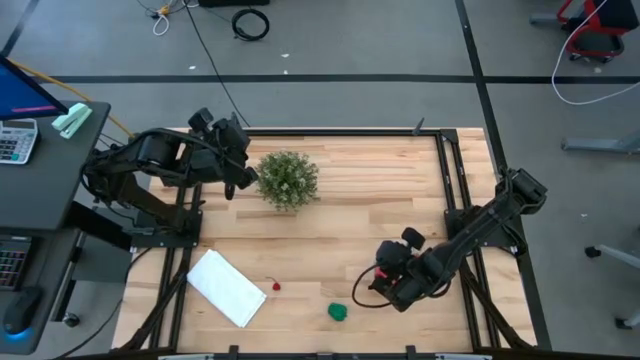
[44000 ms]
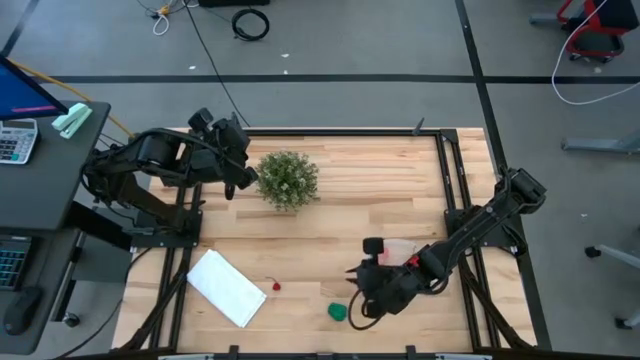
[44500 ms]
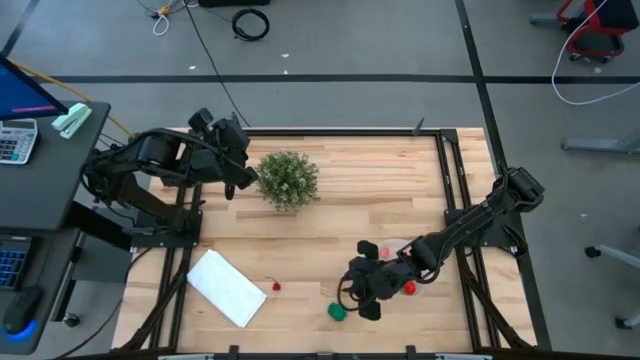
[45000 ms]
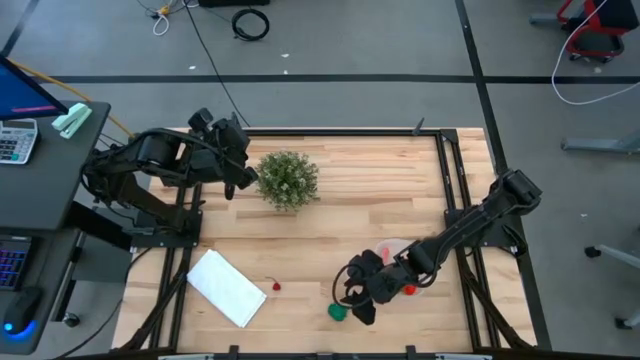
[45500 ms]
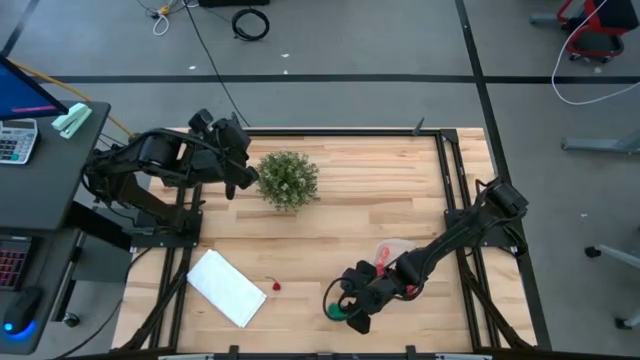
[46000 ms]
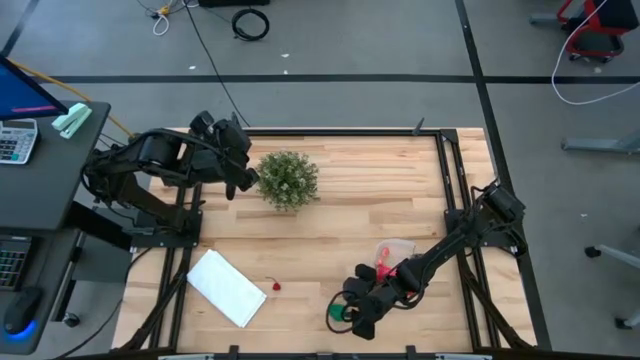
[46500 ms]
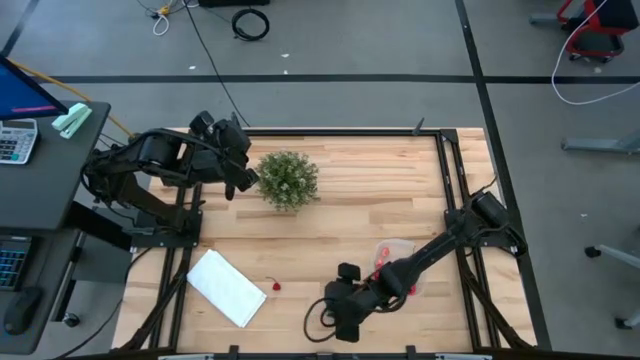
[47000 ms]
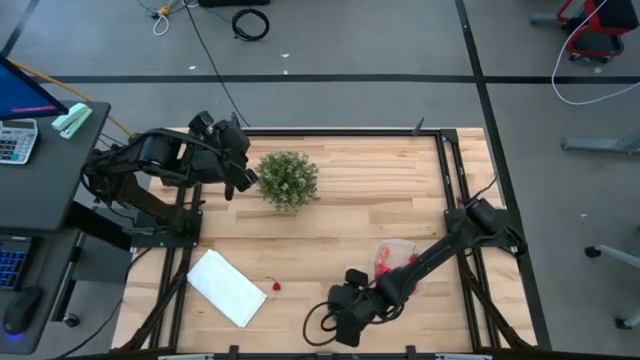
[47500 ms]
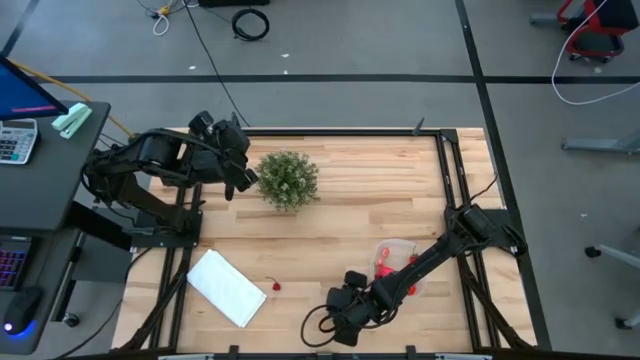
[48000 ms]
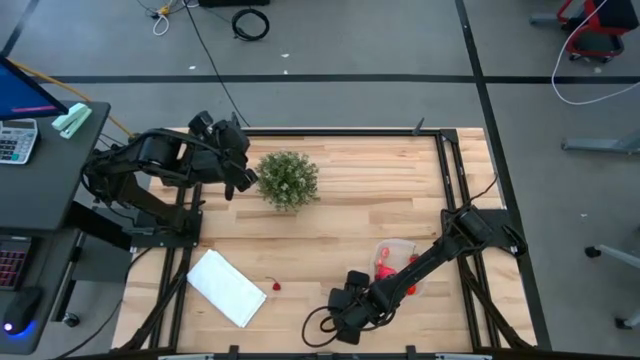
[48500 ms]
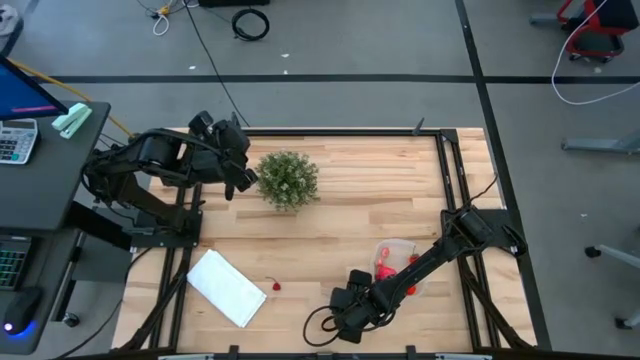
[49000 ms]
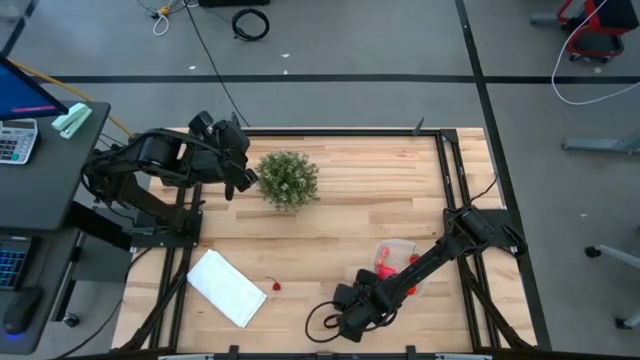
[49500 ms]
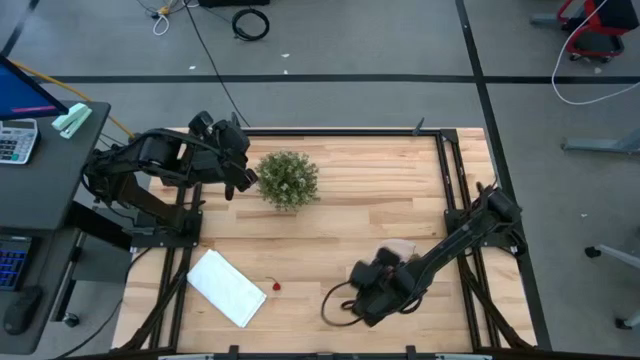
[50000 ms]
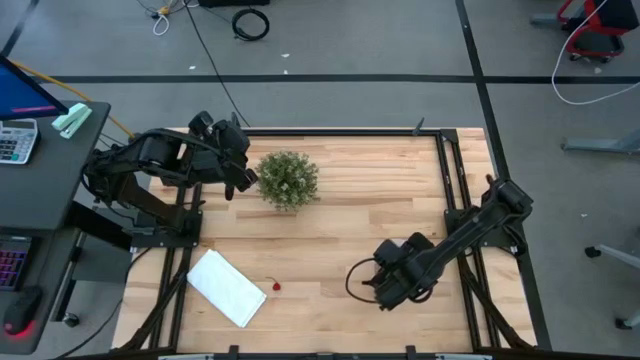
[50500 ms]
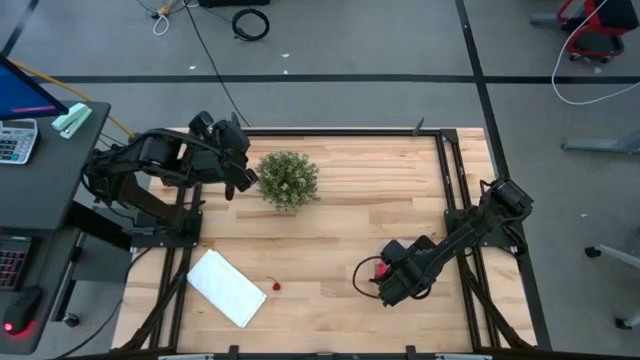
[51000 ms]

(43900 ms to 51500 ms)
Task: Pick and placing Produce into tupperware
Put the bell pepper into the transparent container

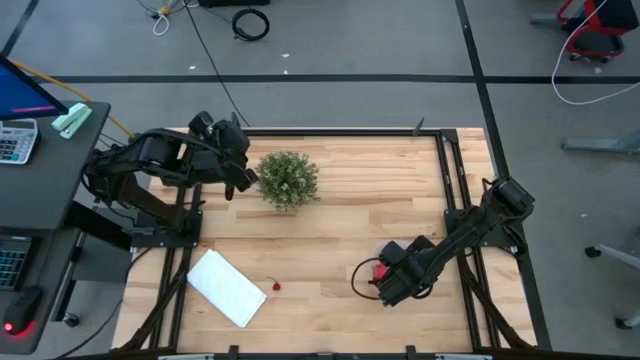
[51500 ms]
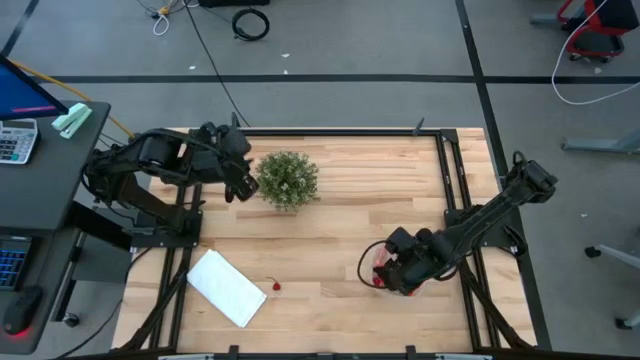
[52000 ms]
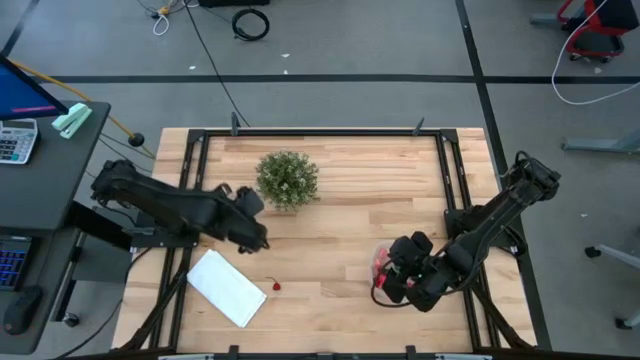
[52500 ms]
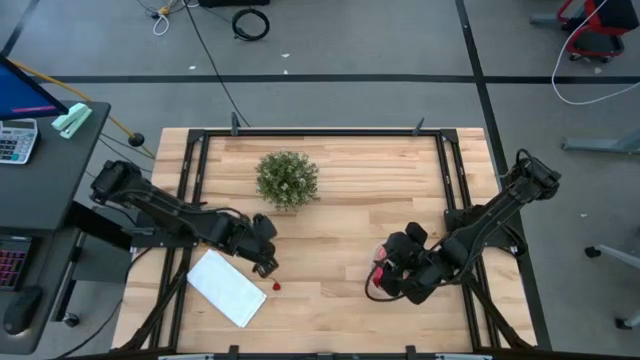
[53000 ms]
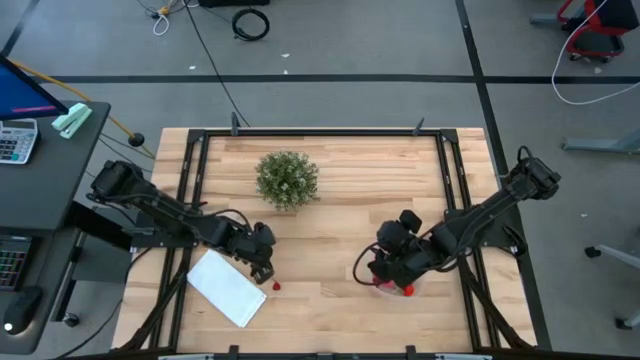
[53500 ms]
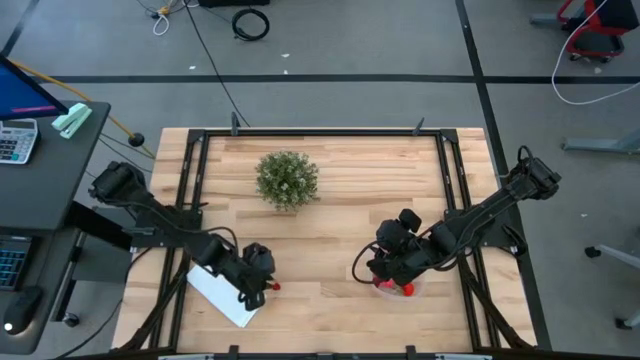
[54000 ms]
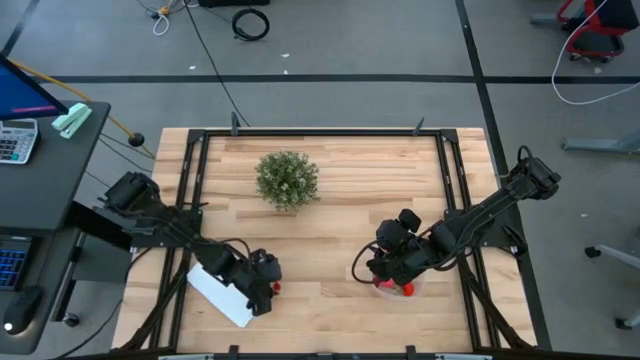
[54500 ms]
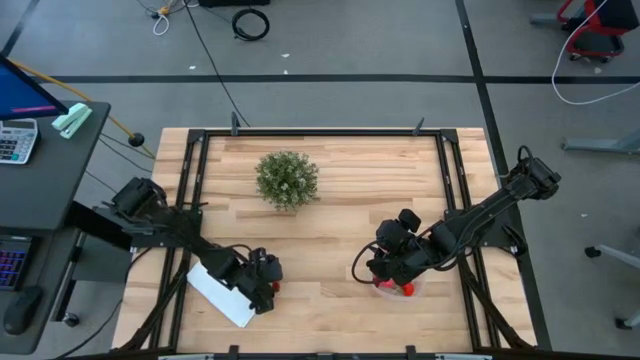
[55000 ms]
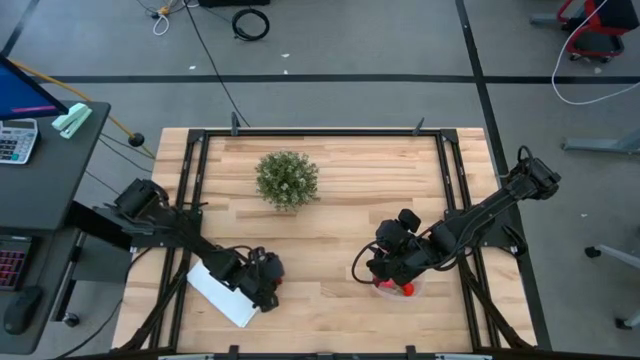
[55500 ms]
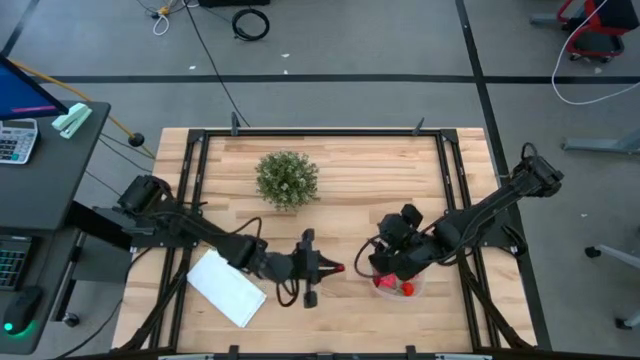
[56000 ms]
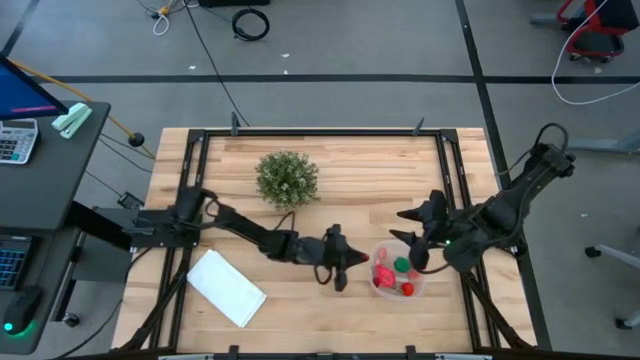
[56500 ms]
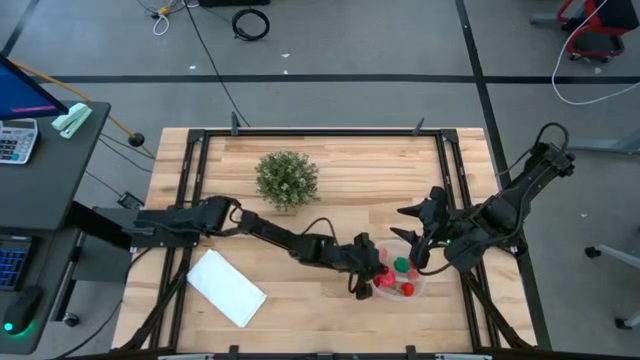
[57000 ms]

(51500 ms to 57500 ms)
Put the cherry into the transparent container

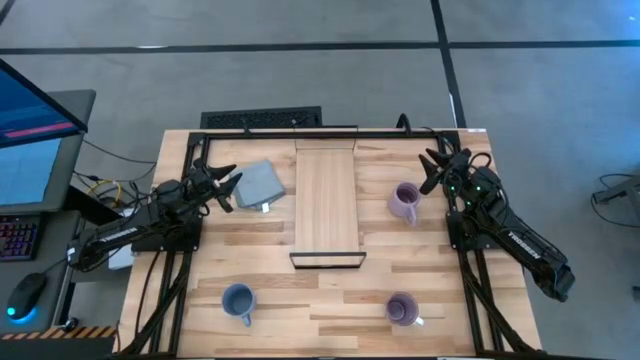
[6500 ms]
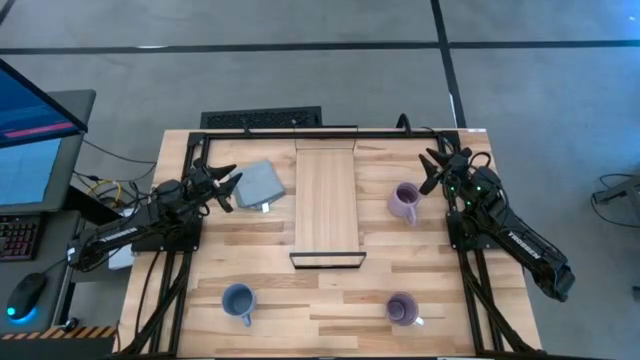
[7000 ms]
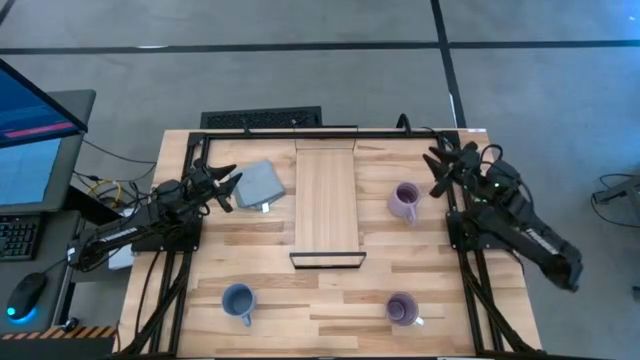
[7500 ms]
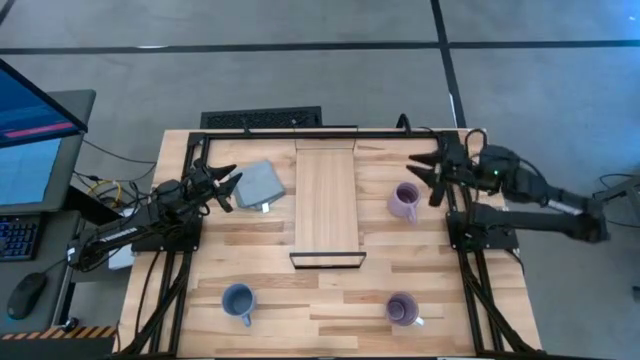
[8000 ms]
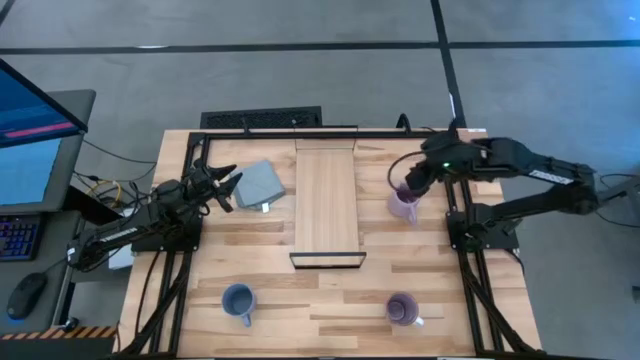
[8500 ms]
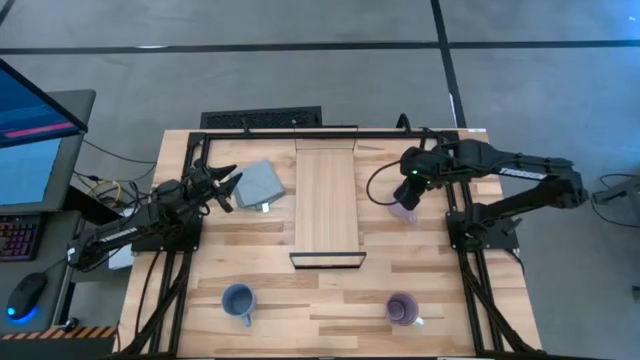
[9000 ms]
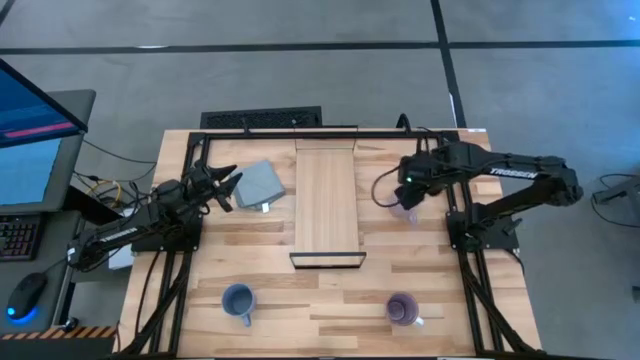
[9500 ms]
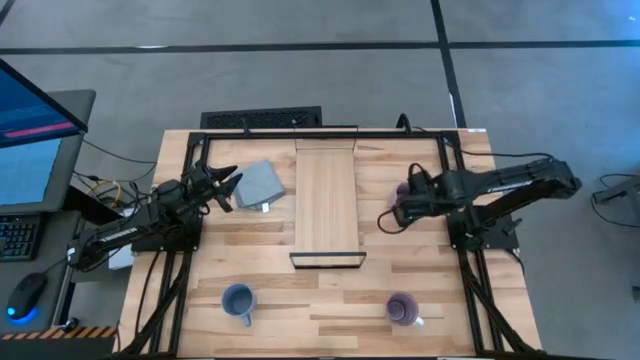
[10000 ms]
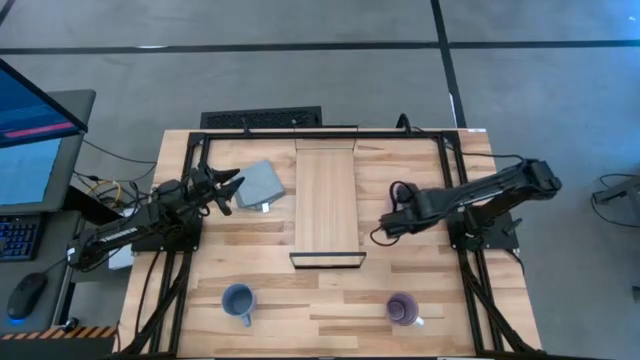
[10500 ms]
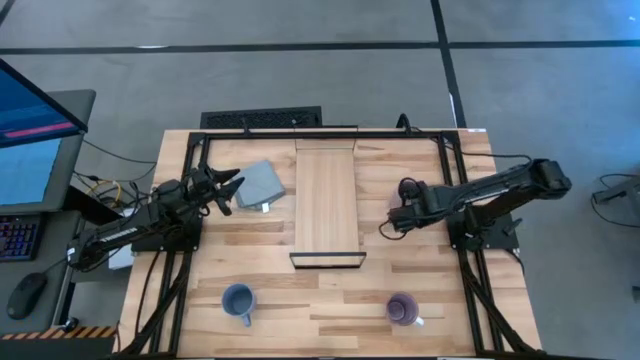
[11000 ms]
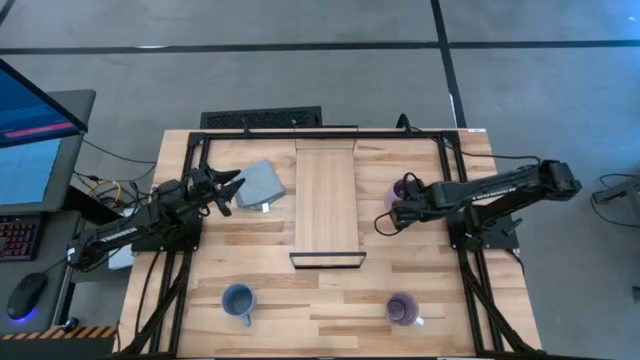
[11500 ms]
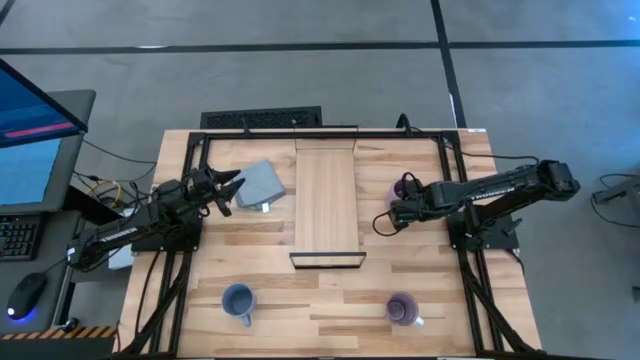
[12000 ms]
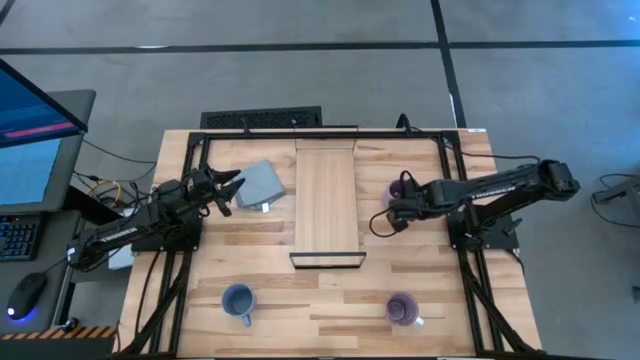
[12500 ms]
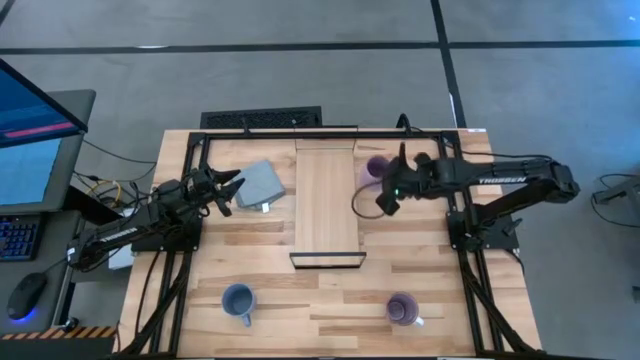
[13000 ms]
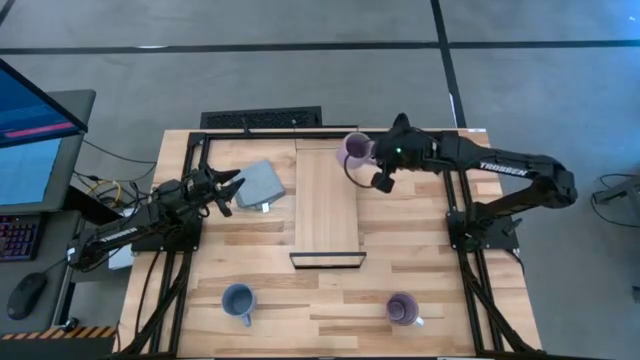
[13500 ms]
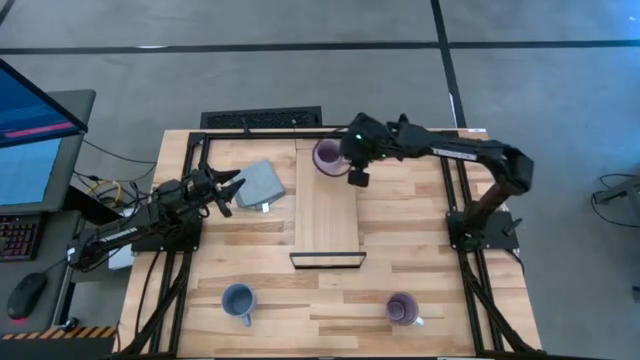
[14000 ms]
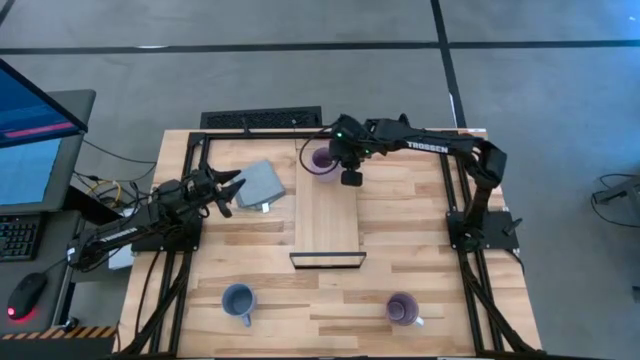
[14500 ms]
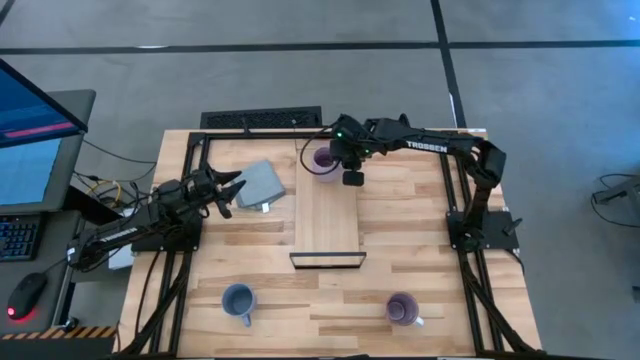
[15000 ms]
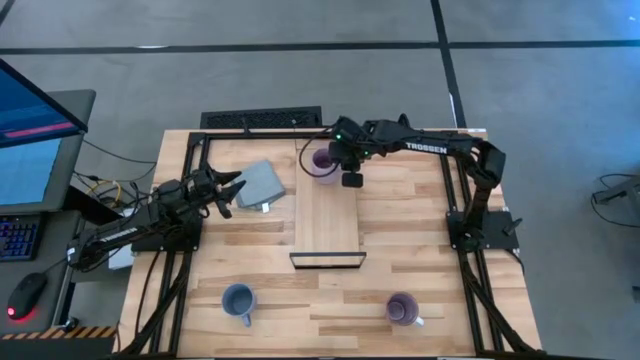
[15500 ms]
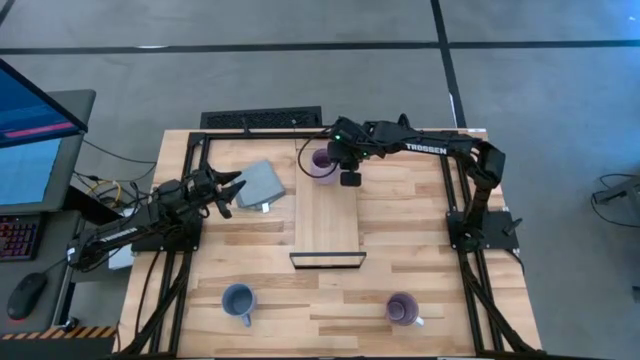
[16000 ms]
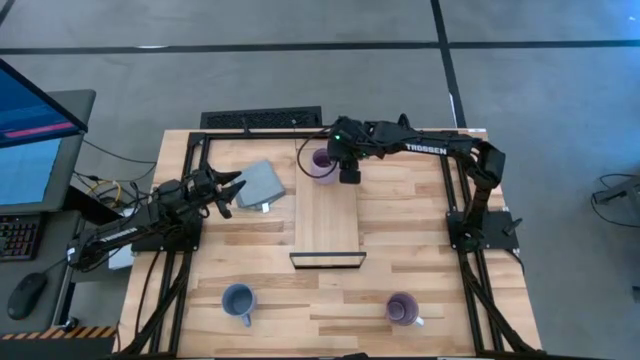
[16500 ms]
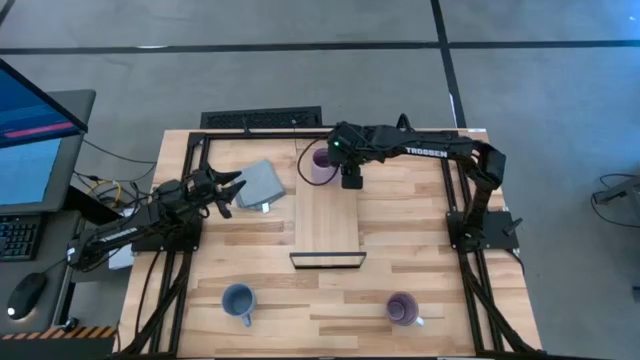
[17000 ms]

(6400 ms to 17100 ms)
Task: Stack small to large cups/mugs on shelf
Put the top purple mug on the shelf
